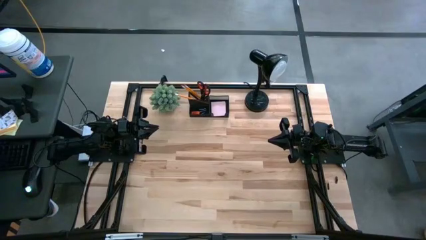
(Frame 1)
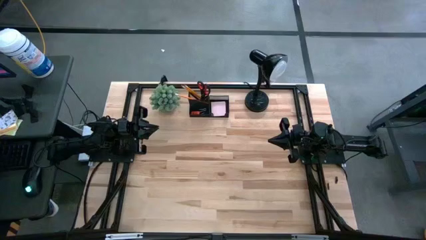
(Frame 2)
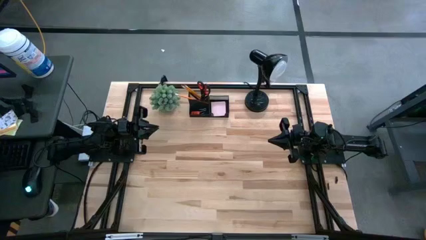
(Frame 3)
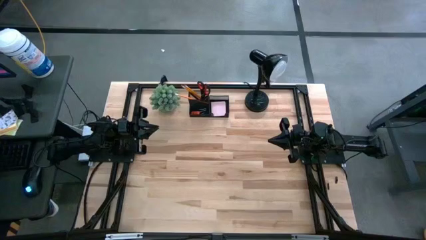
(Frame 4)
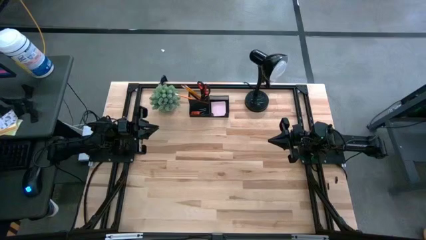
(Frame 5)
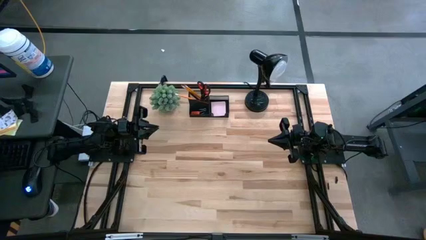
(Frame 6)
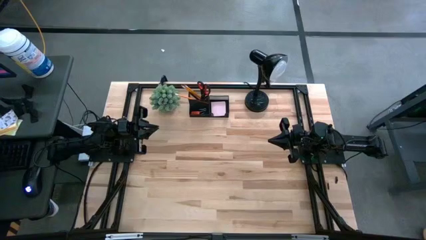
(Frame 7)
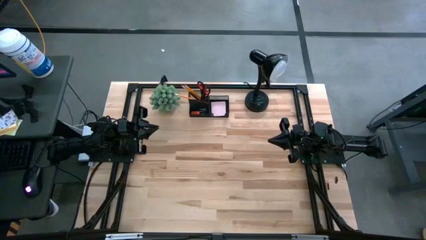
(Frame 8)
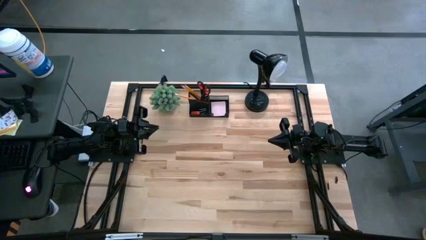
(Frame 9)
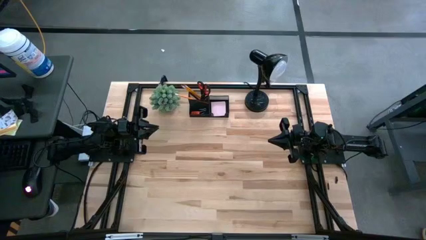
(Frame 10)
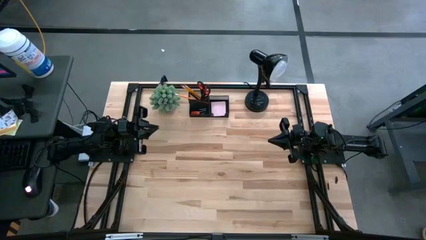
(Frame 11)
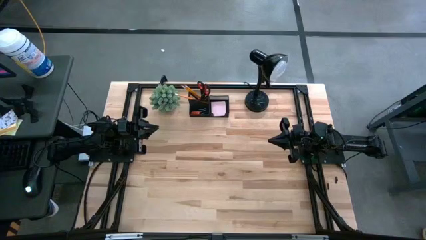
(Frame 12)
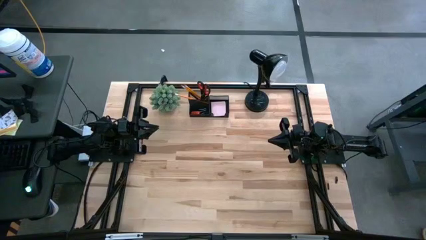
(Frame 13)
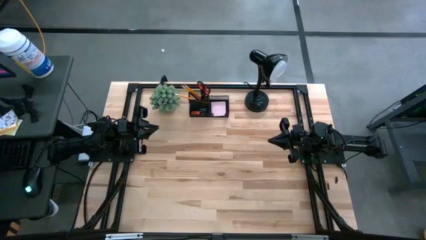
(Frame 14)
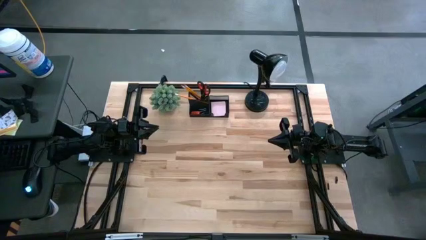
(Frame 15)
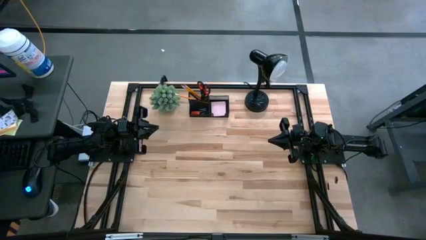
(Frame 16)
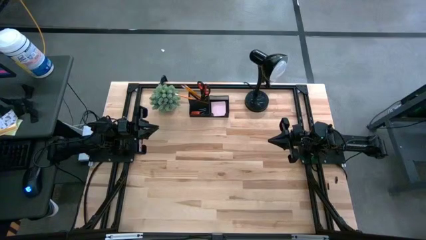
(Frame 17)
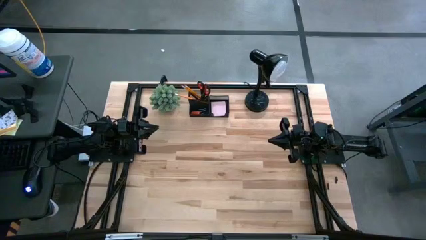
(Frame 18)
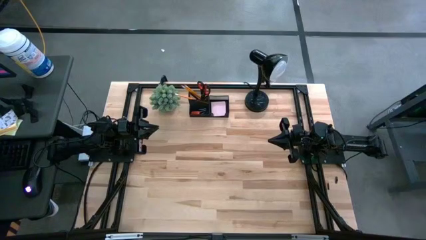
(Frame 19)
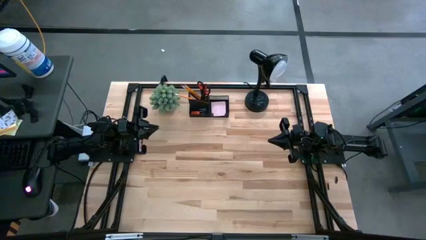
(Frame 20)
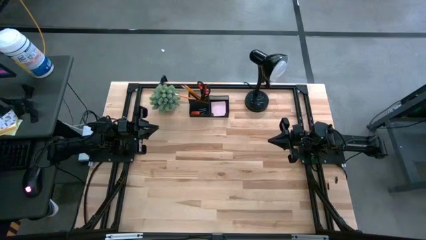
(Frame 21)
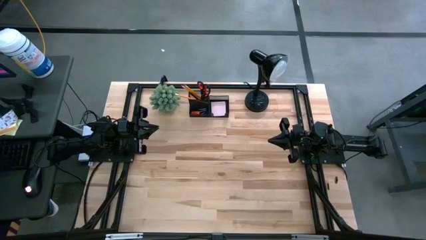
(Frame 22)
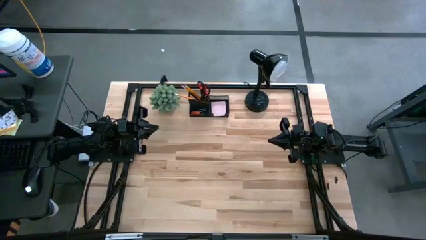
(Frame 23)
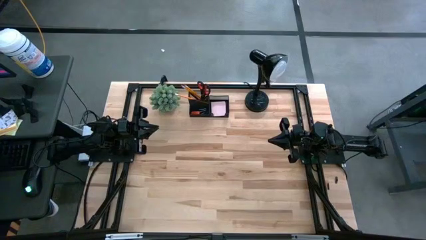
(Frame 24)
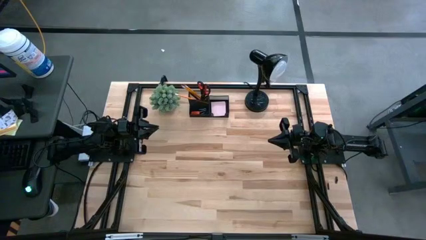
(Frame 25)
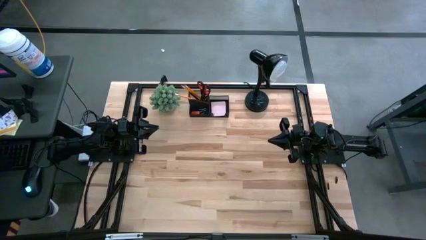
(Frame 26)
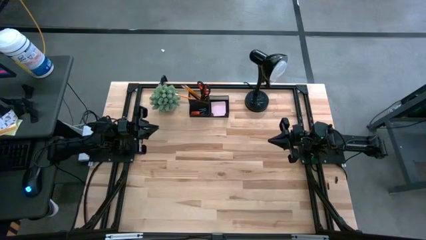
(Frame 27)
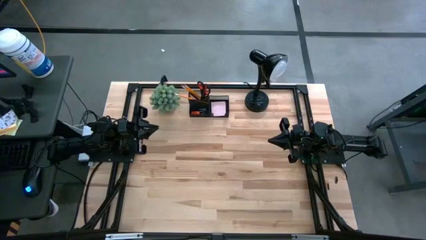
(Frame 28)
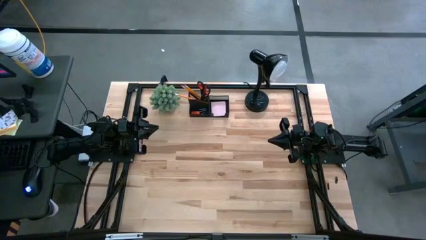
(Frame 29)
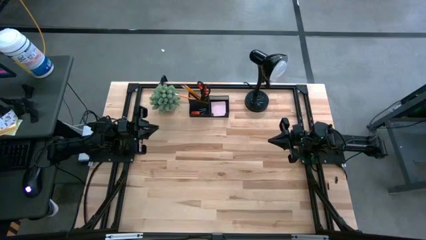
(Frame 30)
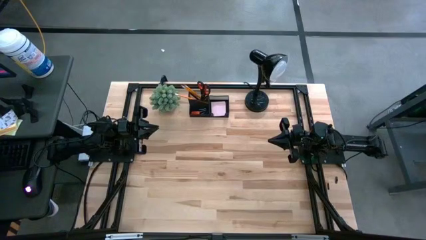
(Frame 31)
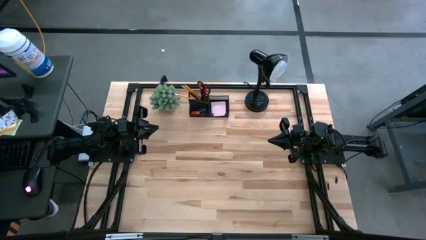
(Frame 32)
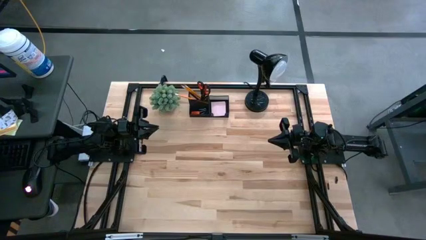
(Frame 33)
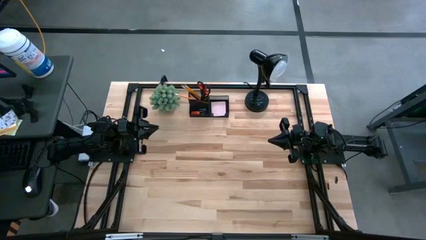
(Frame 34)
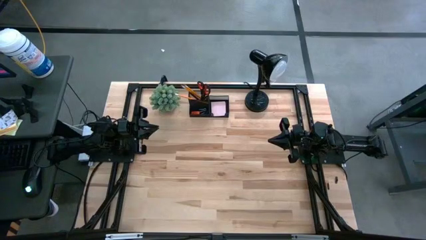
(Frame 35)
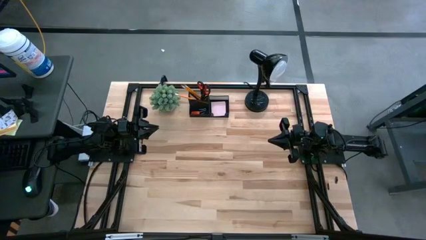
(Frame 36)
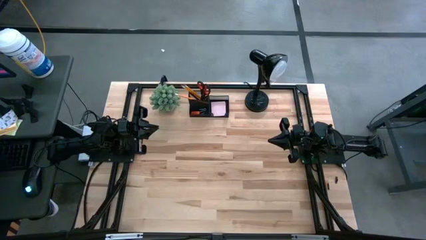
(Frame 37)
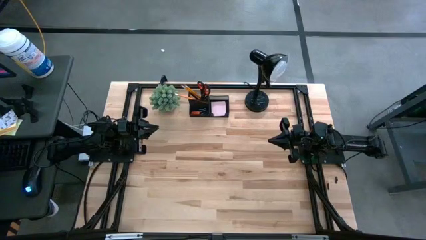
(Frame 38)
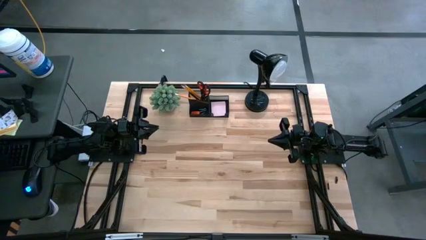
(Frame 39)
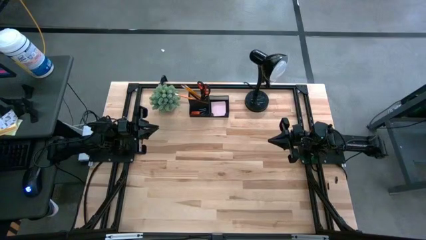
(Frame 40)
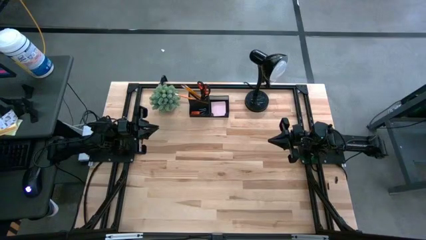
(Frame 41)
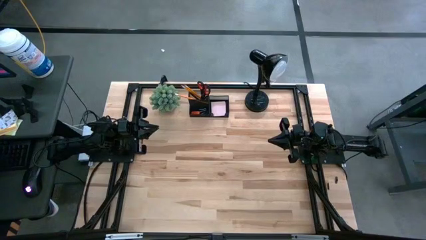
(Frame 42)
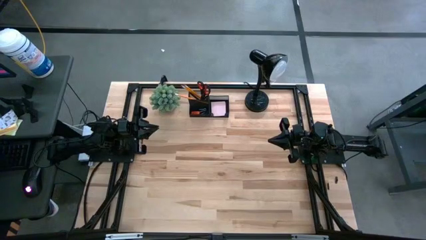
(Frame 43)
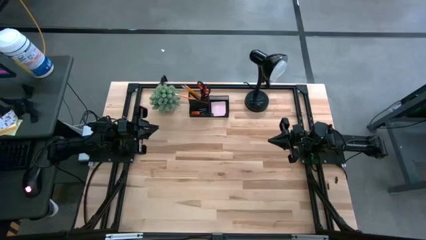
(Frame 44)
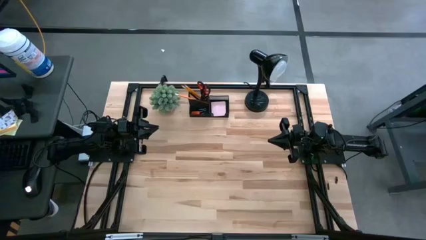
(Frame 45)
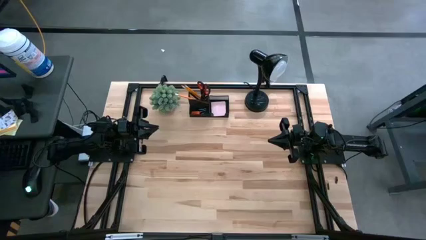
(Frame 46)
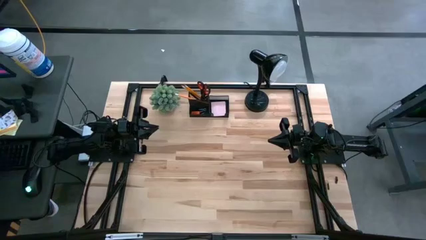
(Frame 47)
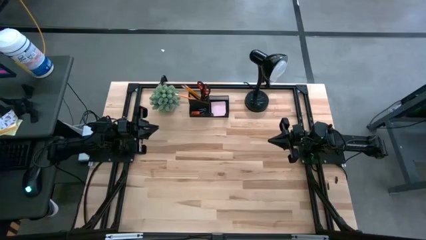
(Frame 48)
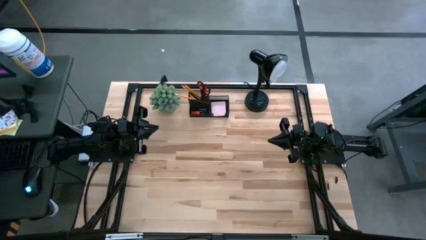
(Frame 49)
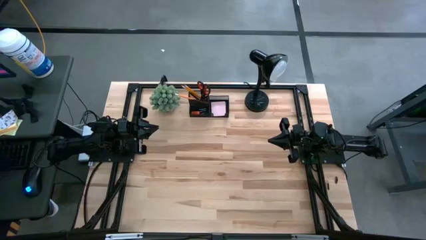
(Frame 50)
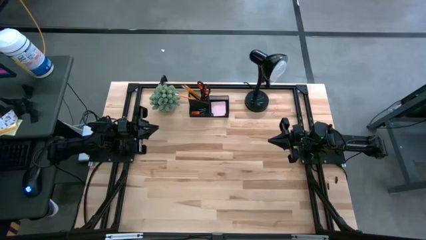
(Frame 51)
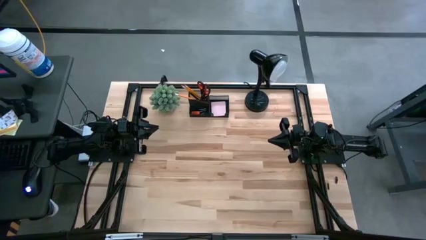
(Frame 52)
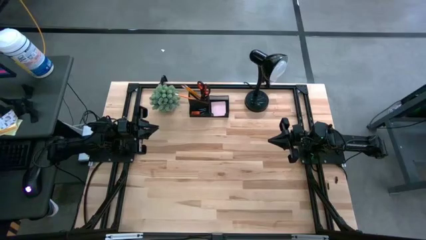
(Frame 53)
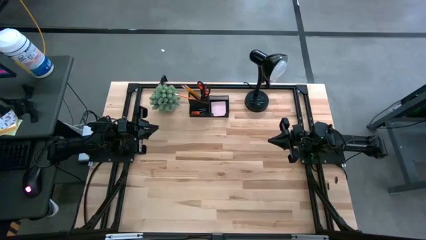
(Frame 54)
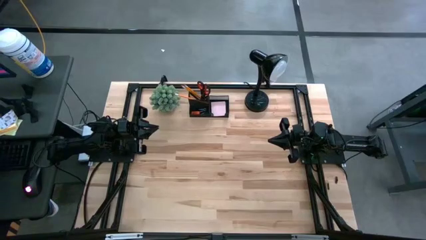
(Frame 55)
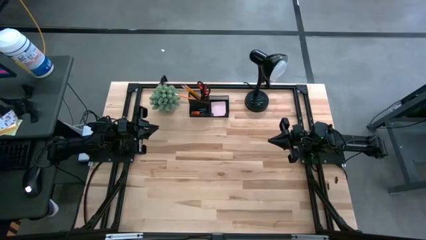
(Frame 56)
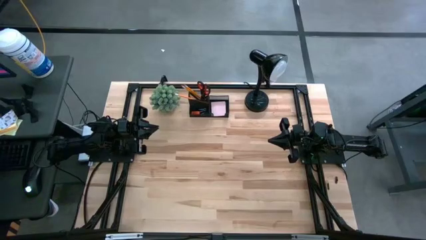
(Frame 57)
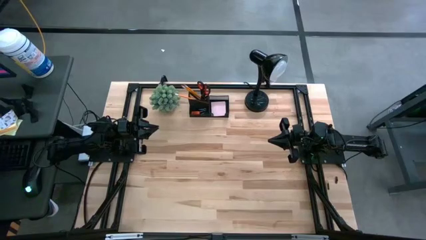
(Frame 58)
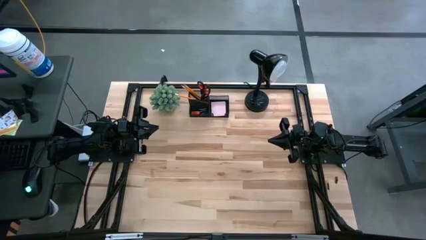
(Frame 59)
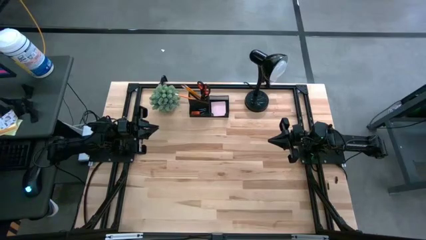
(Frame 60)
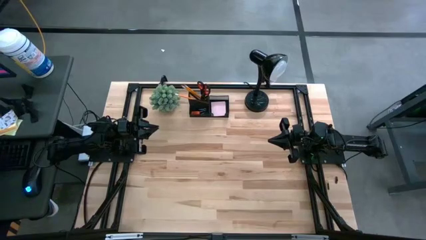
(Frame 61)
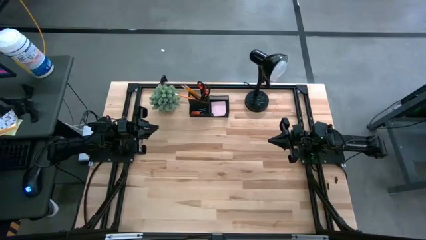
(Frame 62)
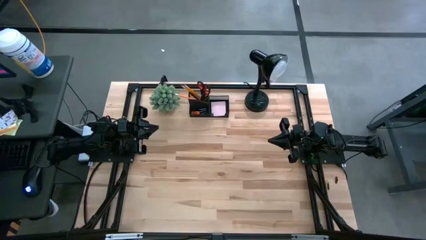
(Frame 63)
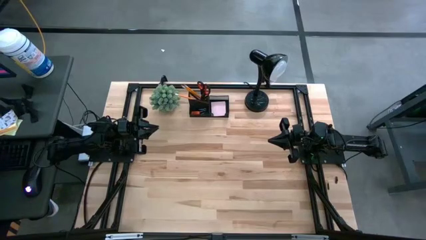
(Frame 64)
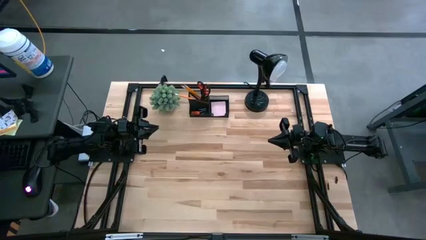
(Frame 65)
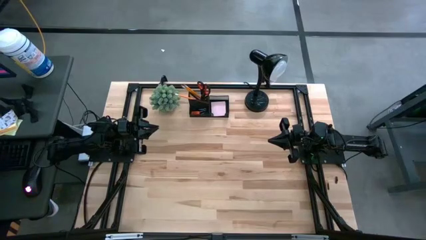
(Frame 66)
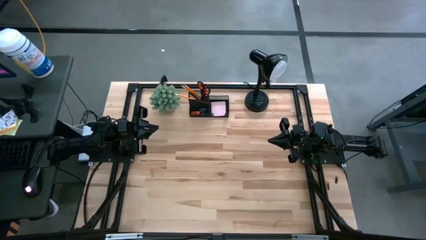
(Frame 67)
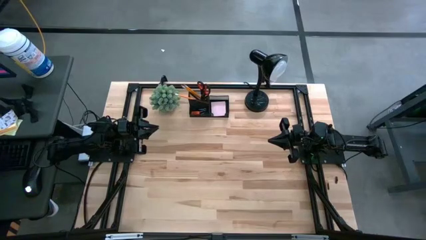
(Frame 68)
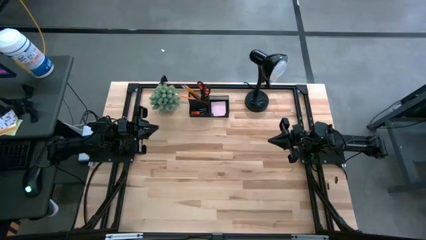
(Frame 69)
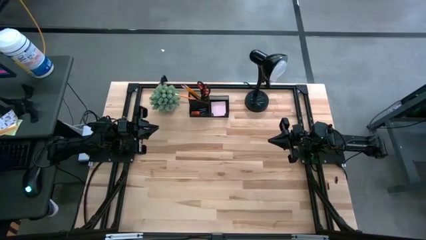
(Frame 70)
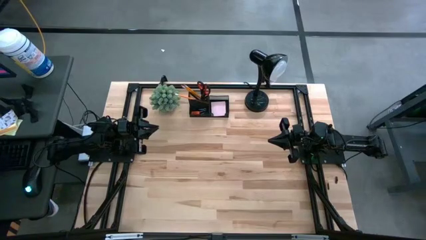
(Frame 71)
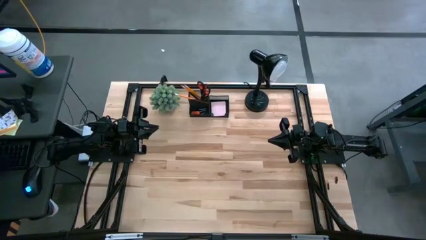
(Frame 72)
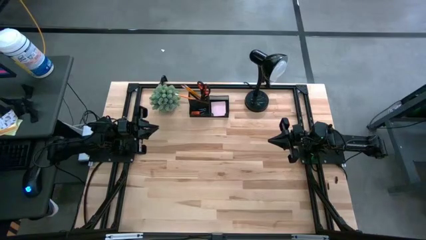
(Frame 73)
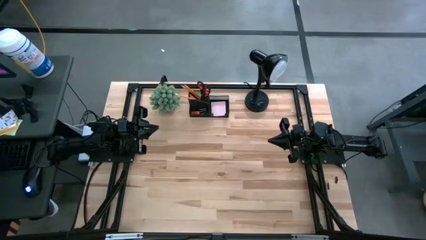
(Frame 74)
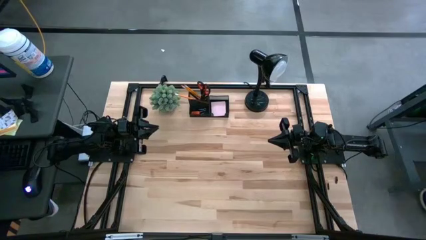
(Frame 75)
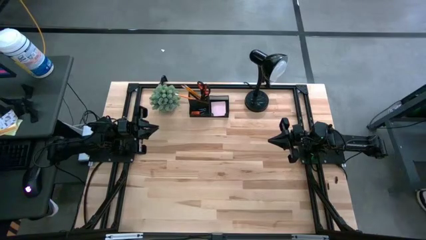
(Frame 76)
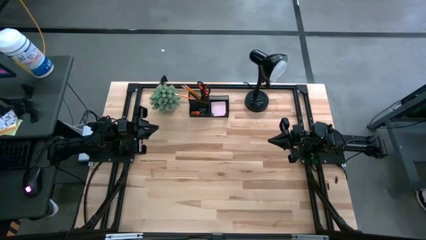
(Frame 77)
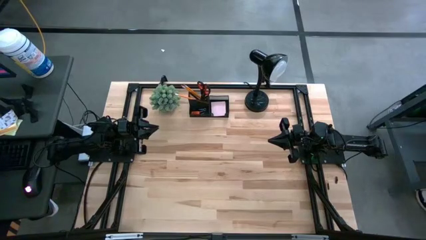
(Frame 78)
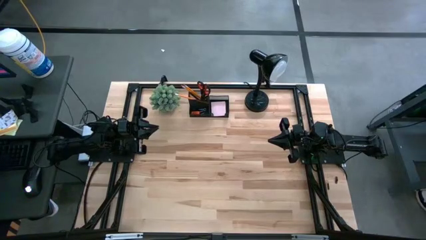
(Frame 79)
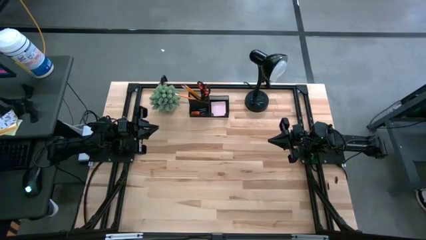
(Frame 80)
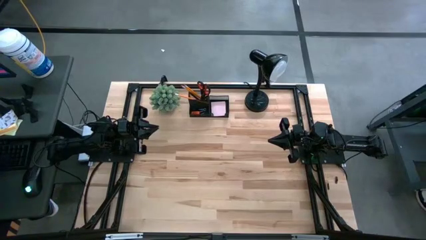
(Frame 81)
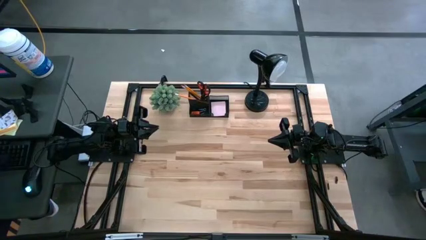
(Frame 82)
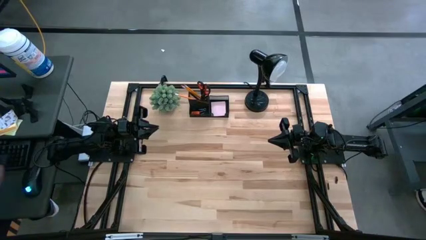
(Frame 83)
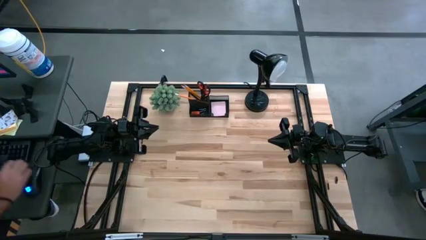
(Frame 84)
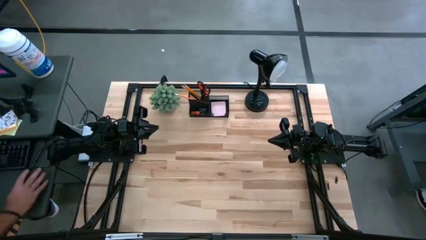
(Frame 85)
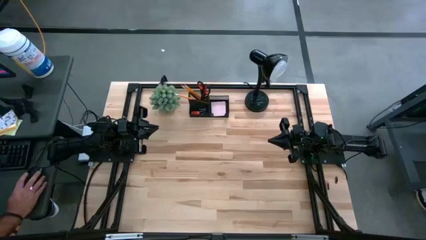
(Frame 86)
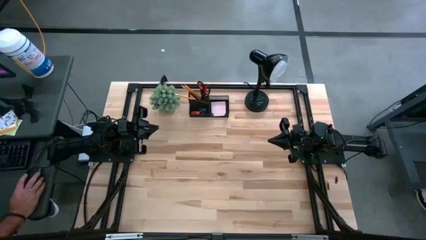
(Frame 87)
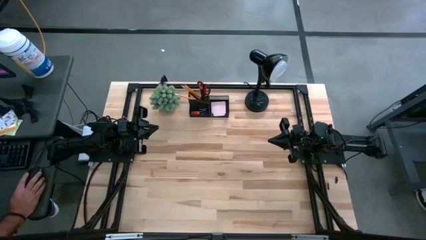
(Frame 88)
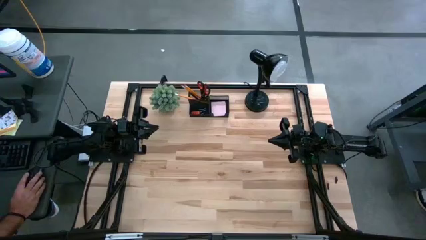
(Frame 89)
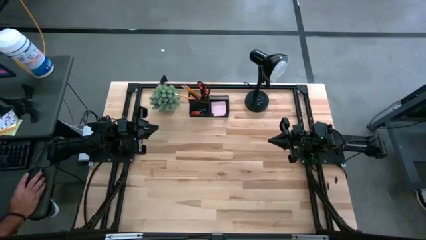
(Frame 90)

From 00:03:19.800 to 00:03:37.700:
Task: Pick and place office supplies into organizer
Return to Home Position
